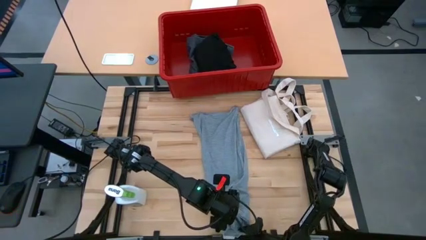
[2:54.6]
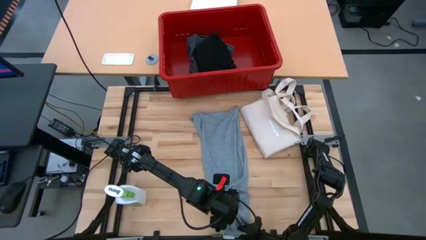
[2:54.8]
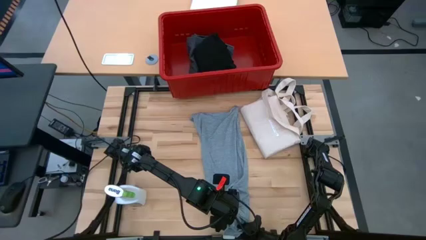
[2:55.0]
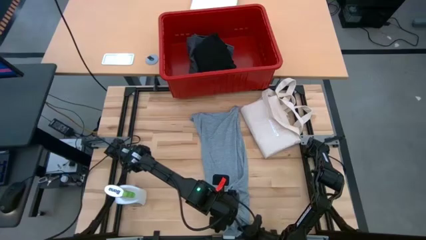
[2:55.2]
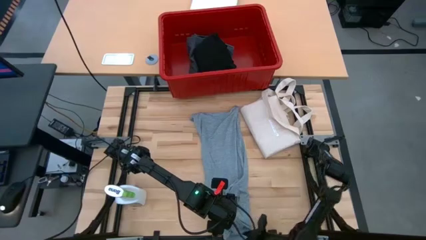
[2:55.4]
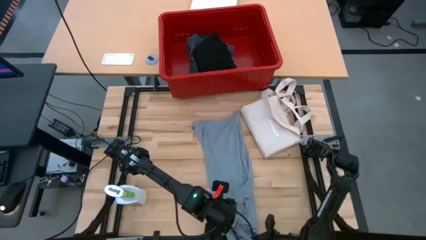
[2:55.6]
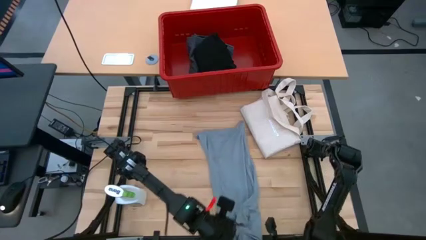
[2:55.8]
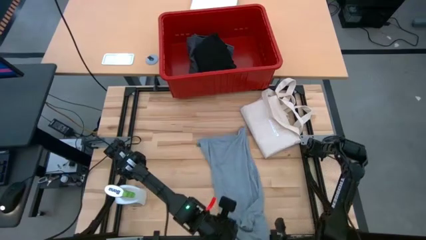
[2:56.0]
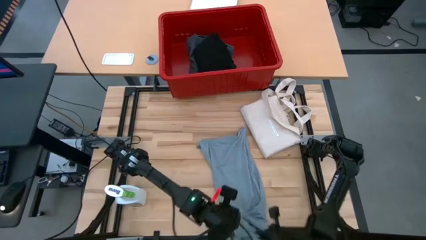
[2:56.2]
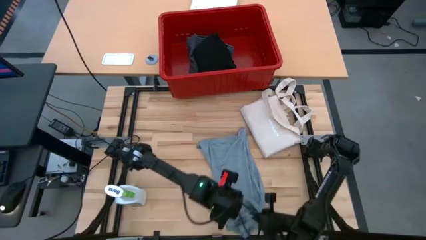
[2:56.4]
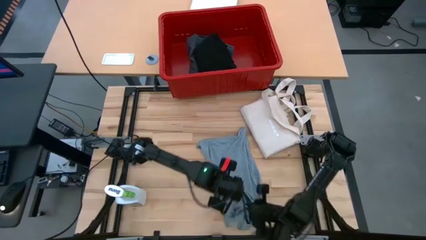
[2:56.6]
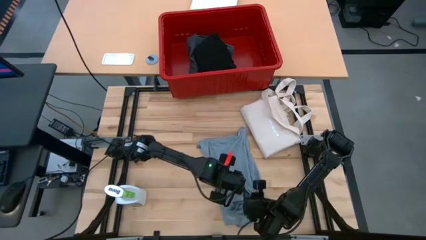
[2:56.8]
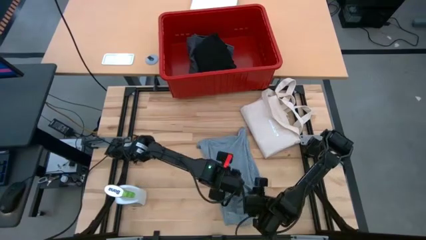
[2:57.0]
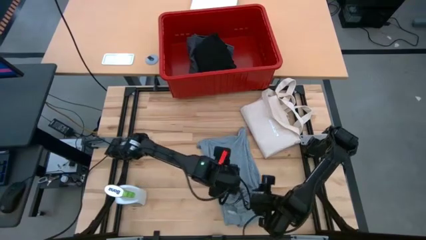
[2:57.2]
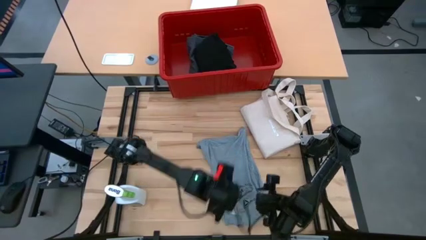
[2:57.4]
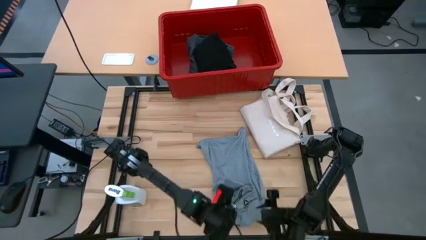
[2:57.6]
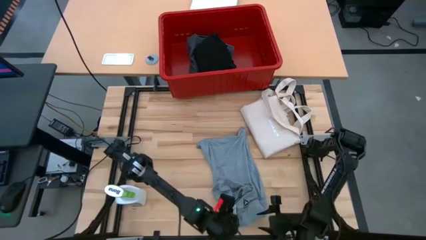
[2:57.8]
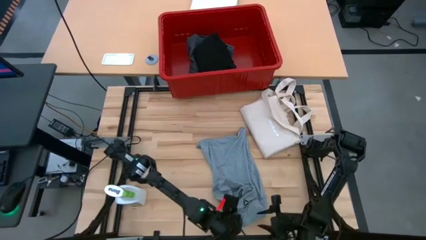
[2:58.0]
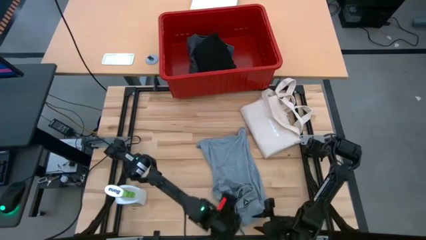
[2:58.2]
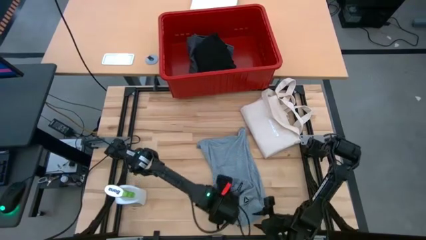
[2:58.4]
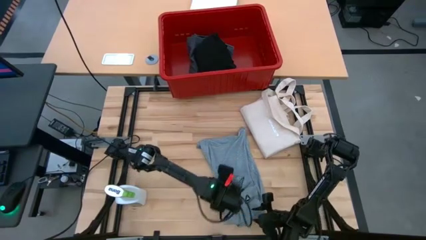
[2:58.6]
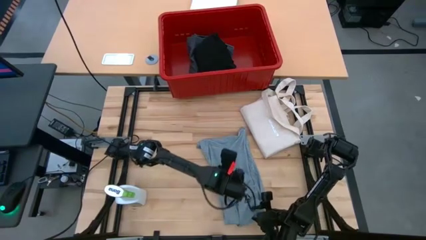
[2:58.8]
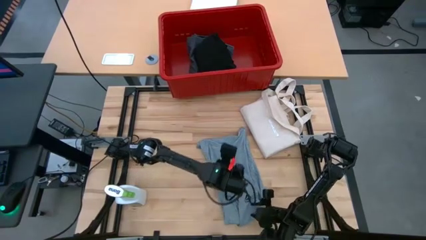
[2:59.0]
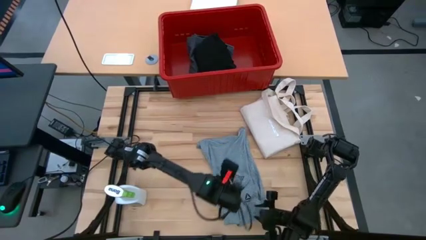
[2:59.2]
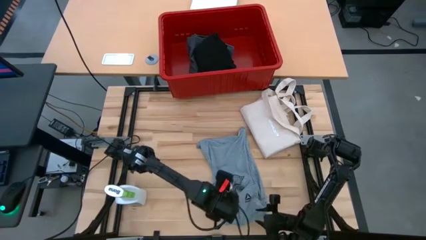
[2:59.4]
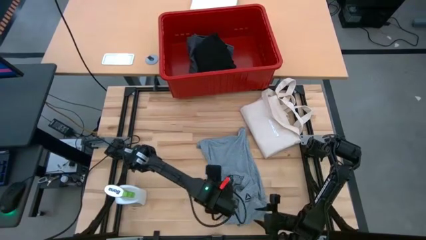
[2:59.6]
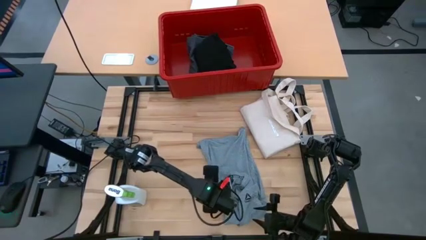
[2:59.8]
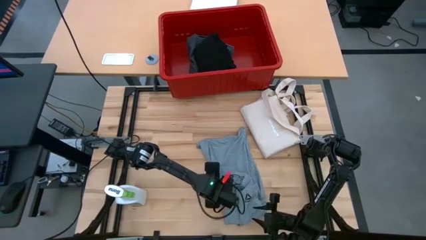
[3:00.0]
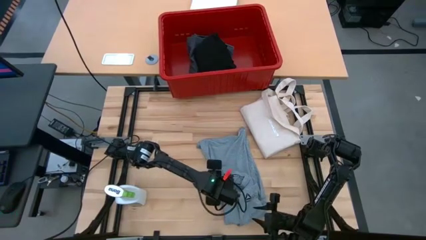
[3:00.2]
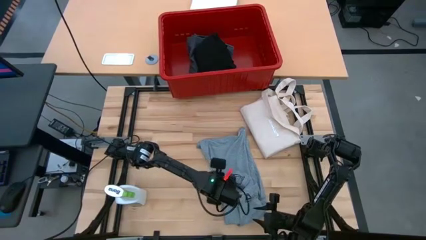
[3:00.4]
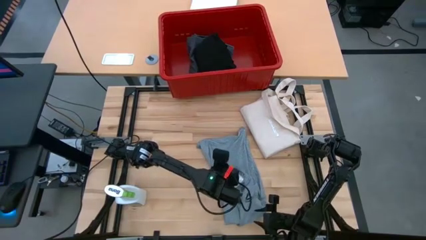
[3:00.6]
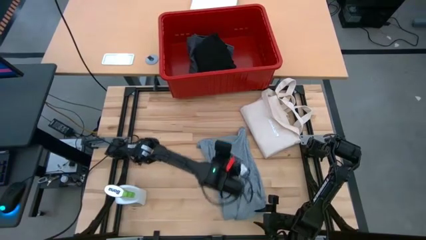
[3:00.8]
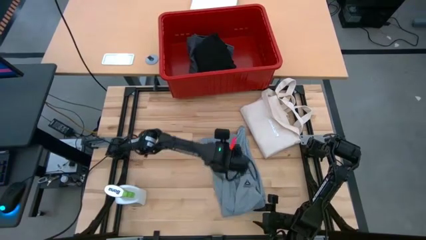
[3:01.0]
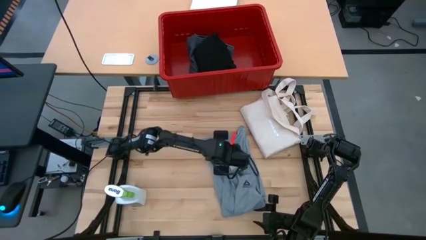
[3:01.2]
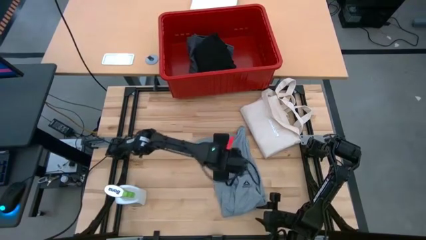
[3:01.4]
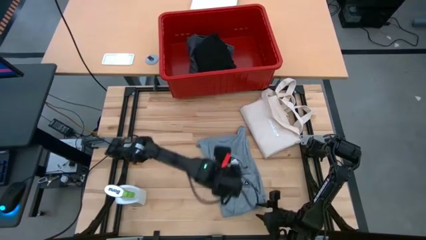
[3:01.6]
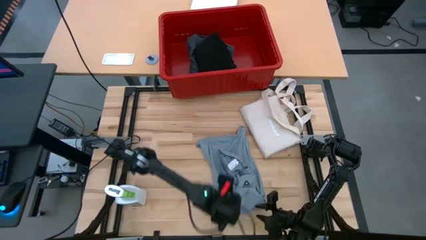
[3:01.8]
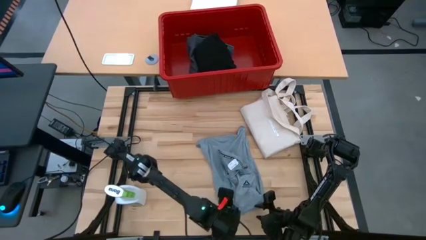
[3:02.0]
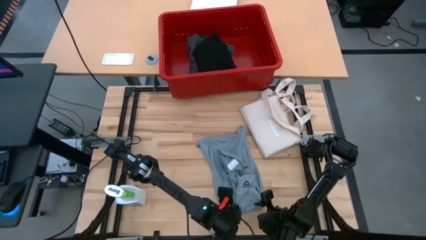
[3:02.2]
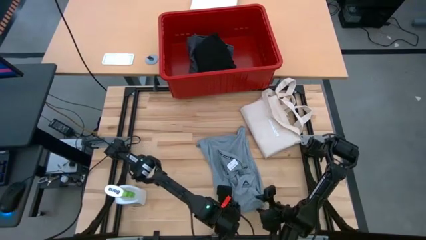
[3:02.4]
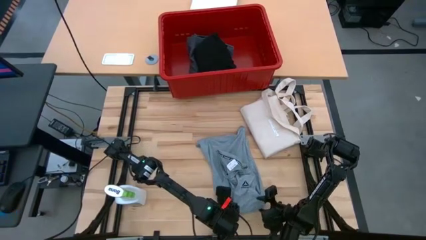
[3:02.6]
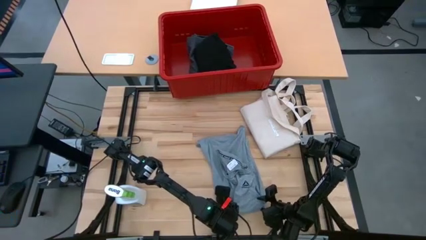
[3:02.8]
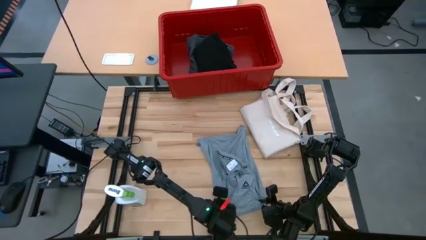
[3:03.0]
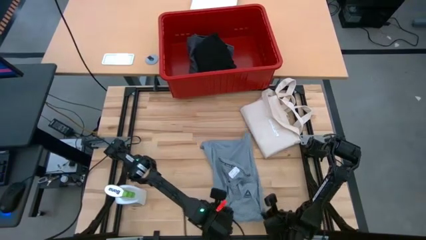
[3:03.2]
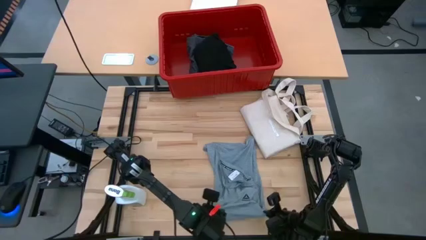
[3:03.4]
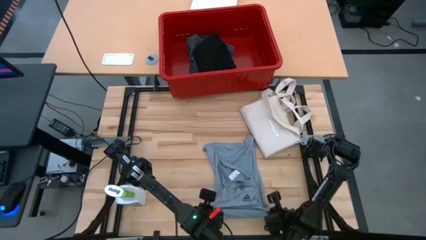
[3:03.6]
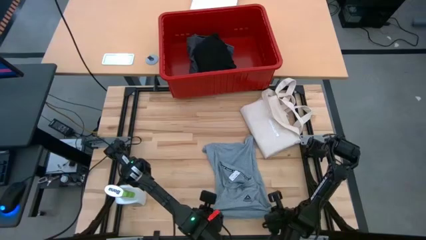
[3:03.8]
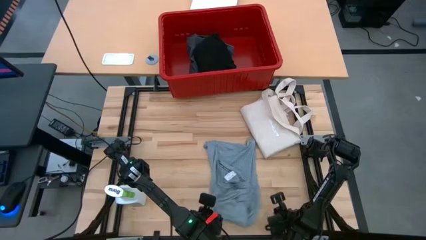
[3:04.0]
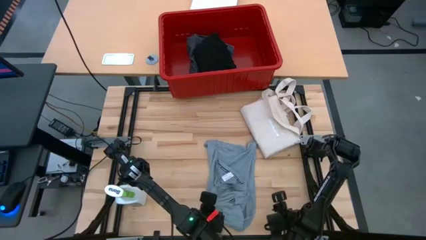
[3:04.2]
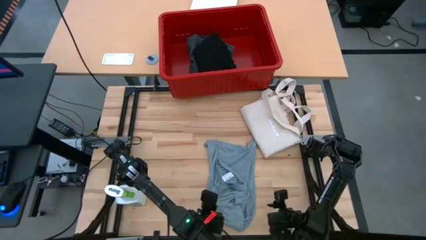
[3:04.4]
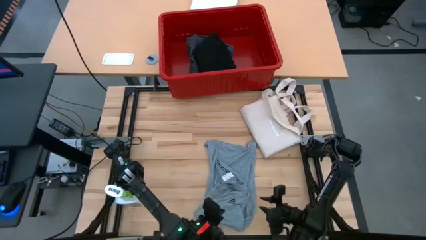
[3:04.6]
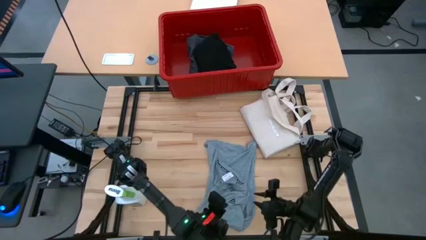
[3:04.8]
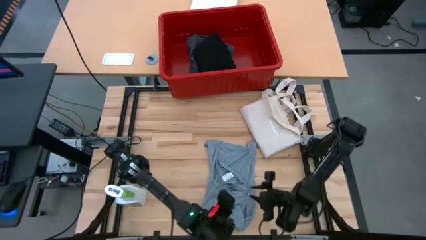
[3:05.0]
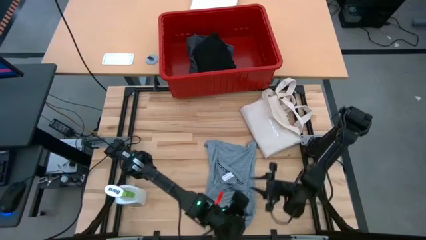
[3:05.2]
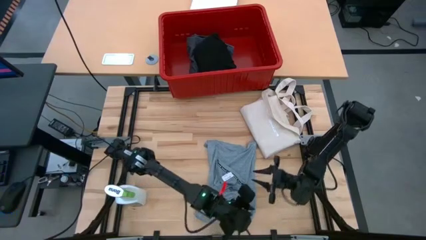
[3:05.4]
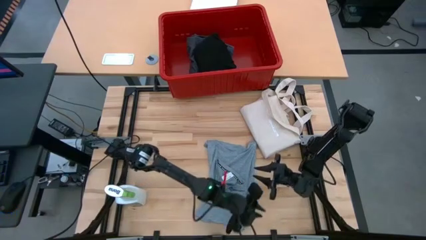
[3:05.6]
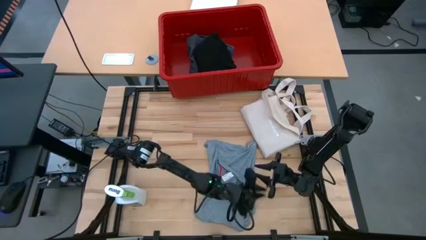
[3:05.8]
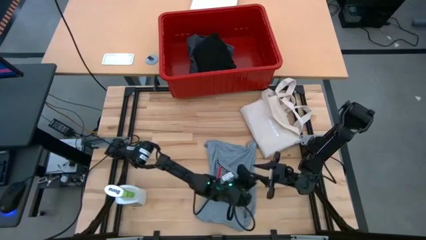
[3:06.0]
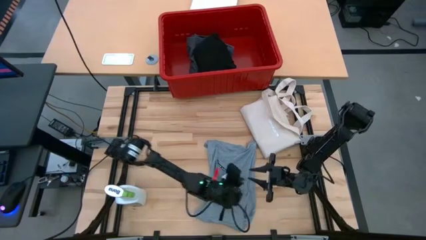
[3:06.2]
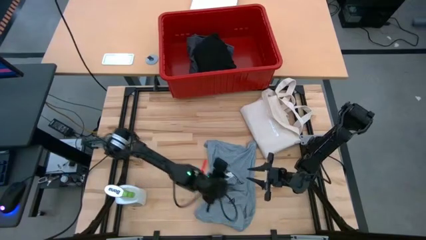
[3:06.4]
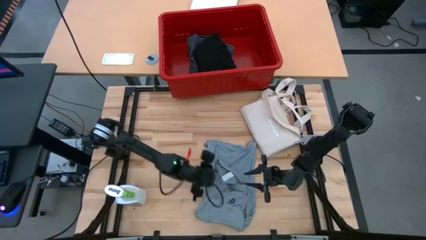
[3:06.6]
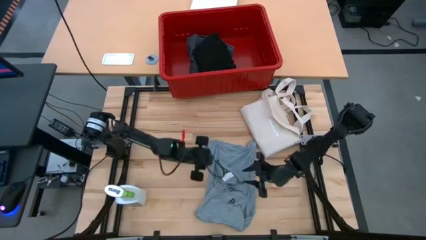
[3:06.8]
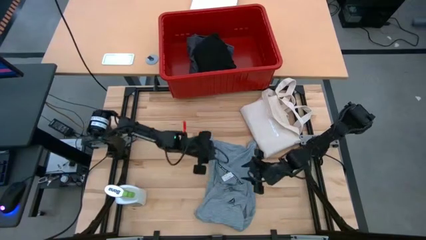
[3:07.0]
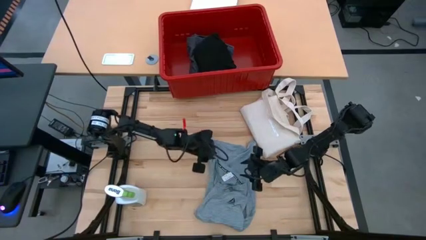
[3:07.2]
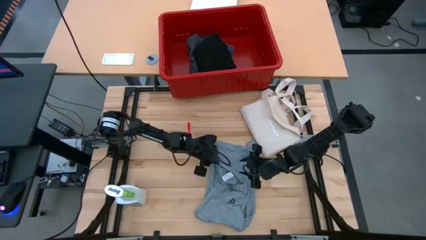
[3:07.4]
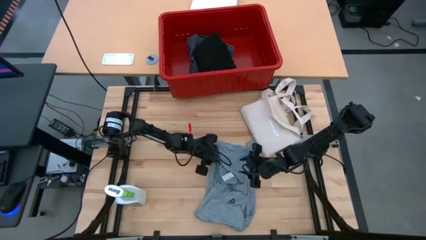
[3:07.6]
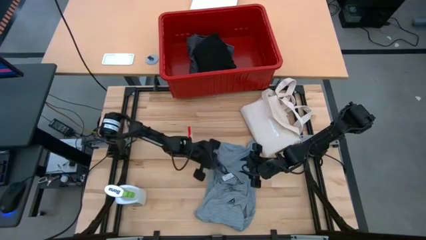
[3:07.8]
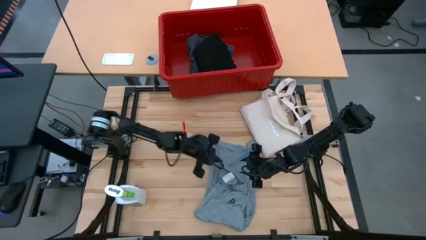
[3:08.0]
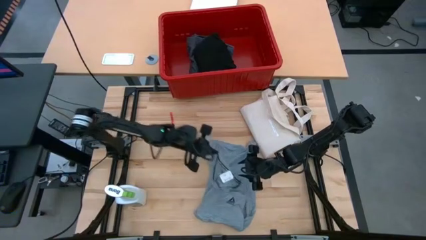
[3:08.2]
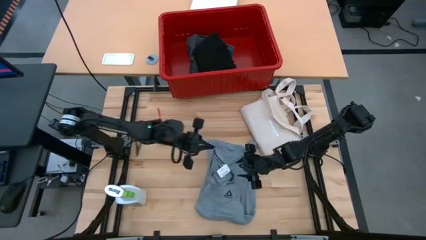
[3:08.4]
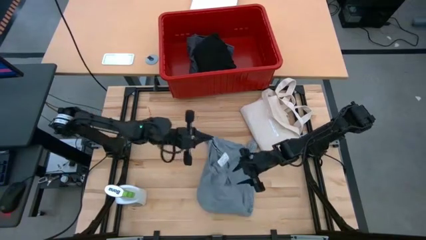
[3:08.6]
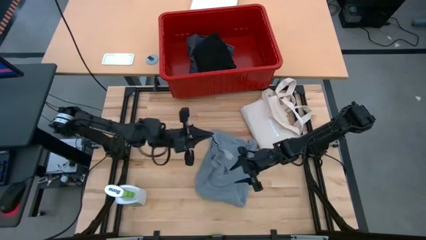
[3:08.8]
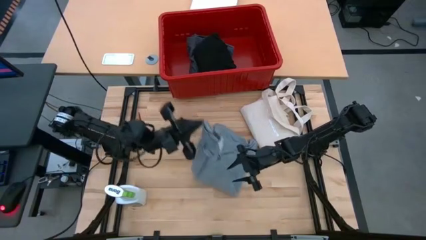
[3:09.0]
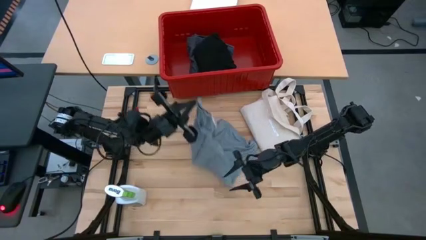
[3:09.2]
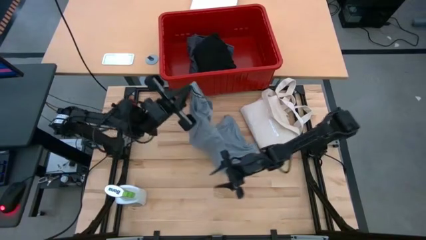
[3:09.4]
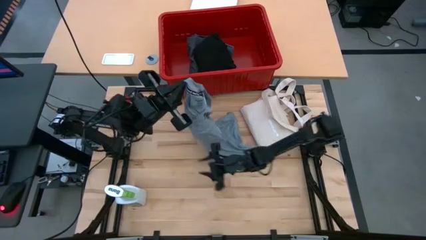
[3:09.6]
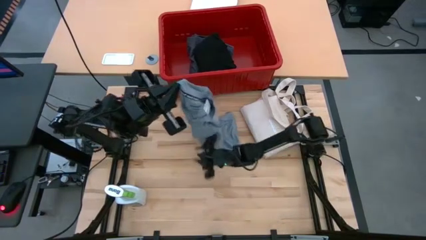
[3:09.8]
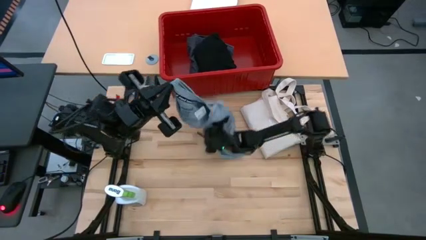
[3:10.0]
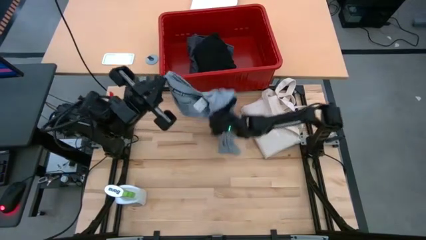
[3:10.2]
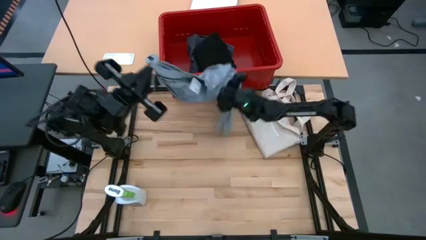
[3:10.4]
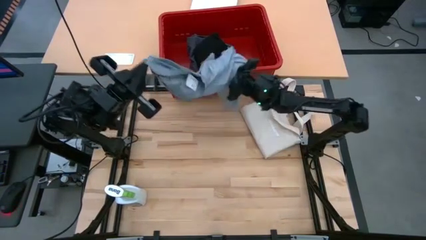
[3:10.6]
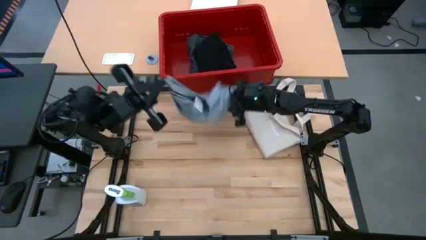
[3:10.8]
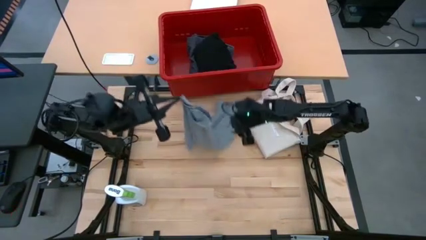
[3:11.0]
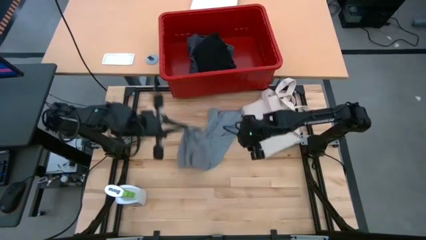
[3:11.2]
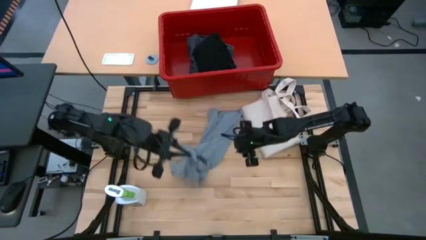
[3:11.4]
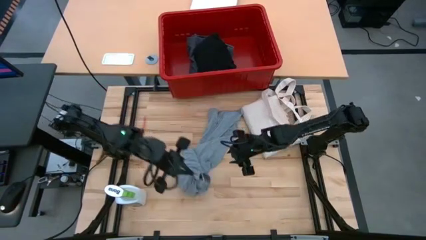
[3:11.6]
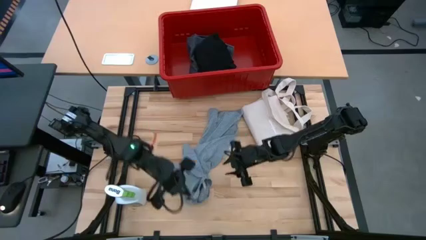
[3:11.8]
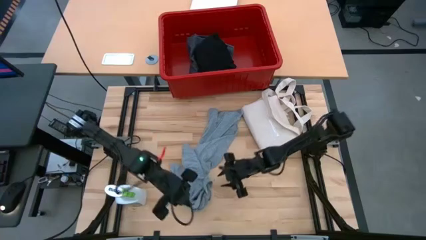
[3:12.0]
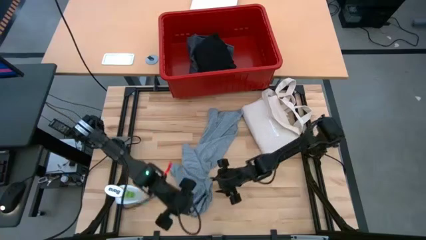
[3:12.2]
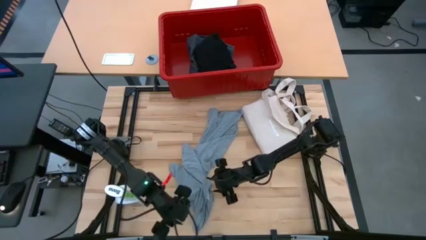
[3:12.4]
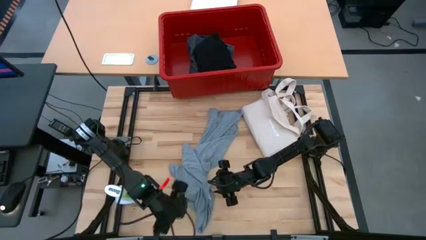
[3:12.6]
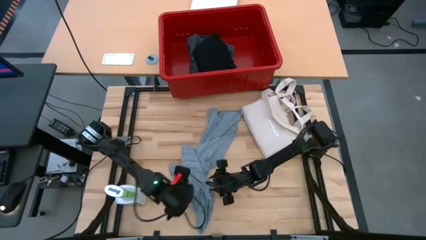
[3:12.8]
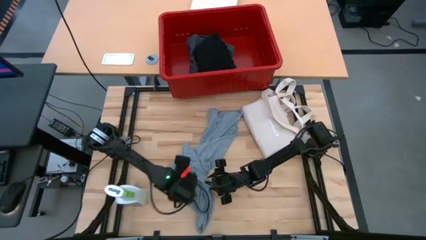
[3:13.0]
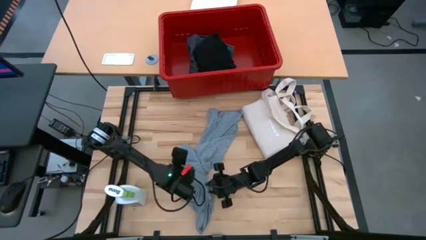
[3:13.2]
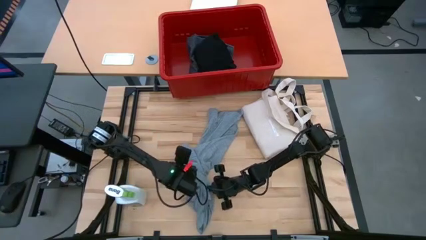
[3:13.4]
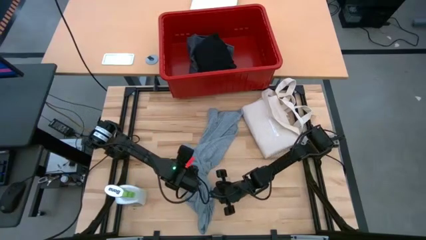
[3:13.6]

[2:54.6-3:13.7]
Task: Fold Laundry from Bin
Fold the gray shirt
